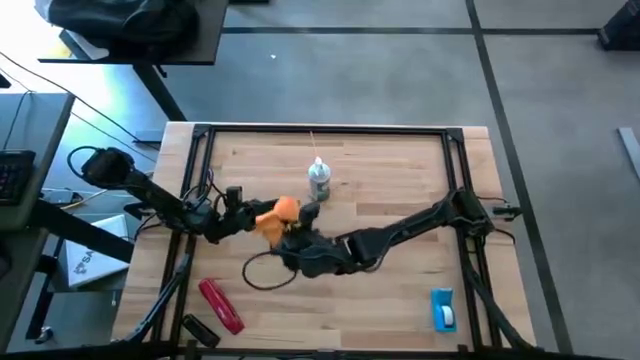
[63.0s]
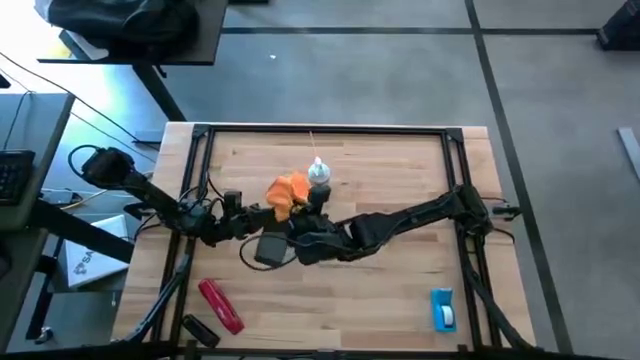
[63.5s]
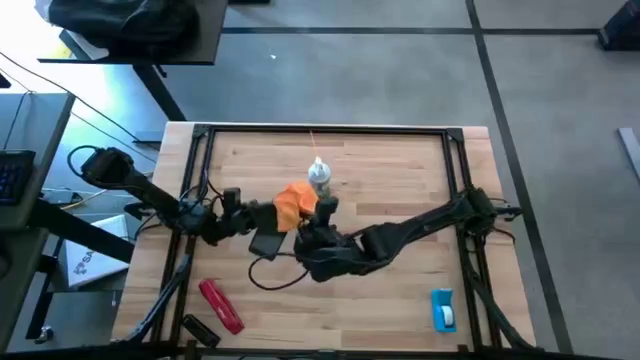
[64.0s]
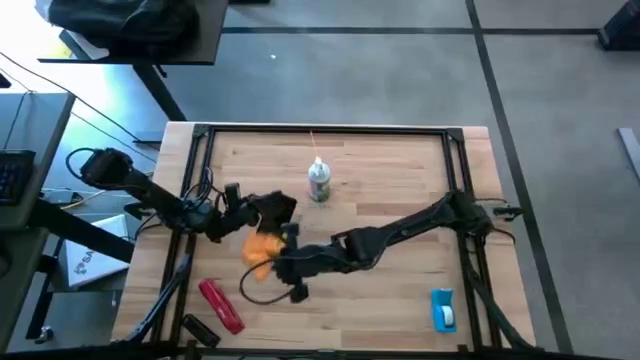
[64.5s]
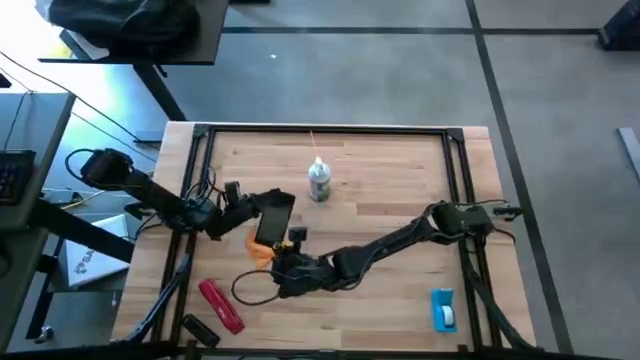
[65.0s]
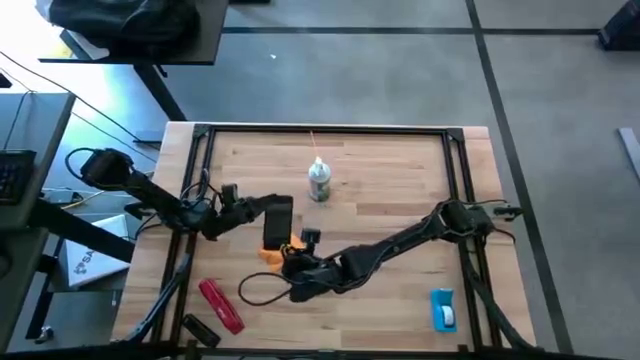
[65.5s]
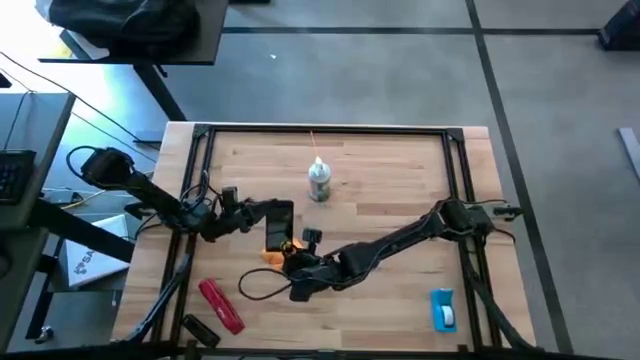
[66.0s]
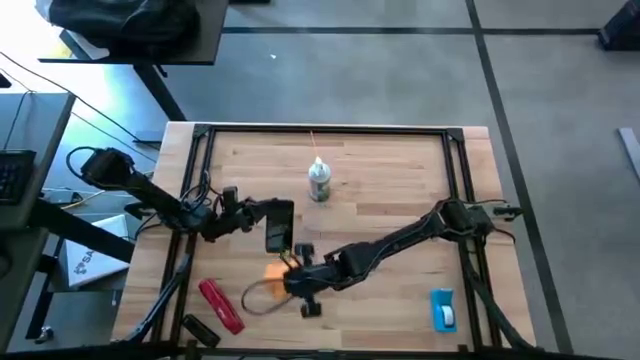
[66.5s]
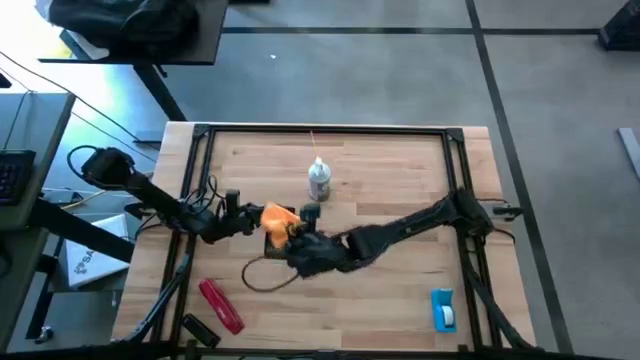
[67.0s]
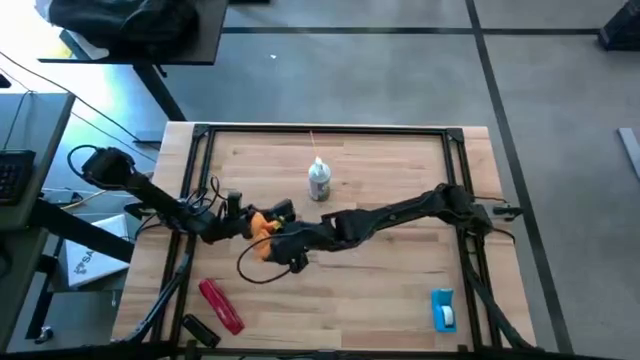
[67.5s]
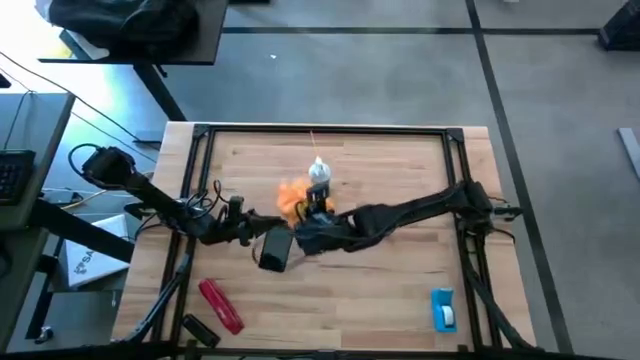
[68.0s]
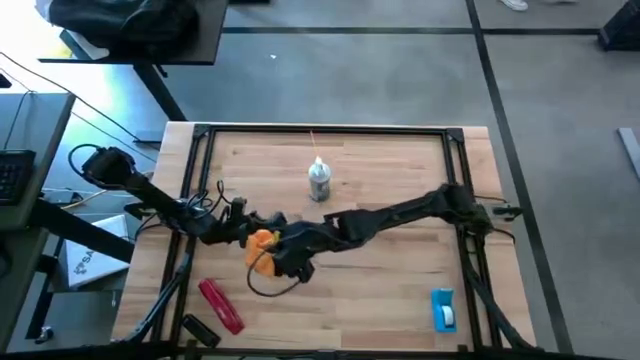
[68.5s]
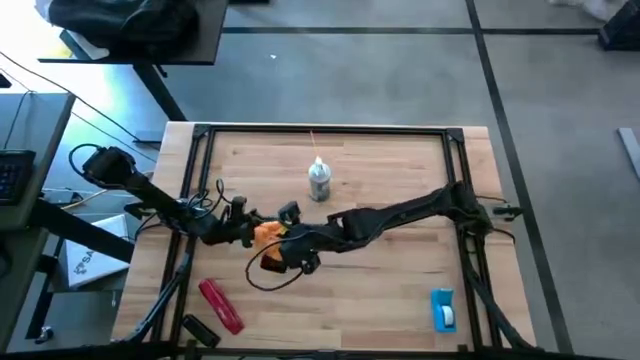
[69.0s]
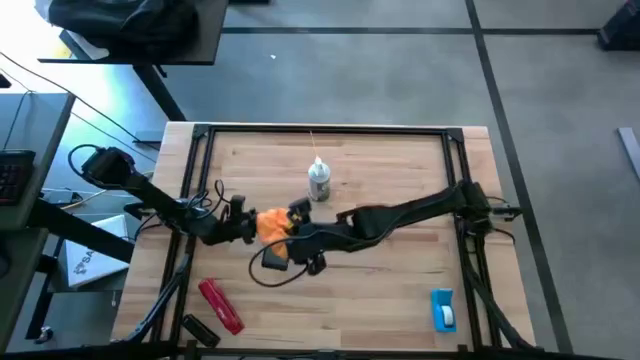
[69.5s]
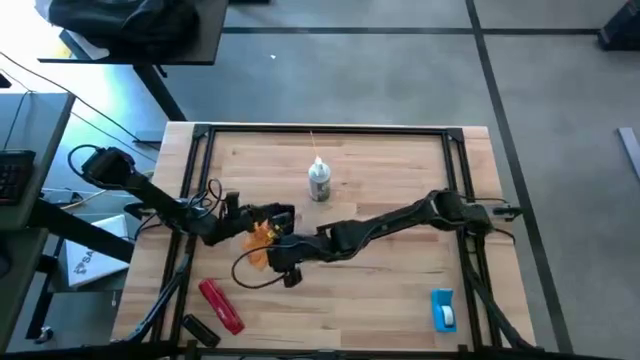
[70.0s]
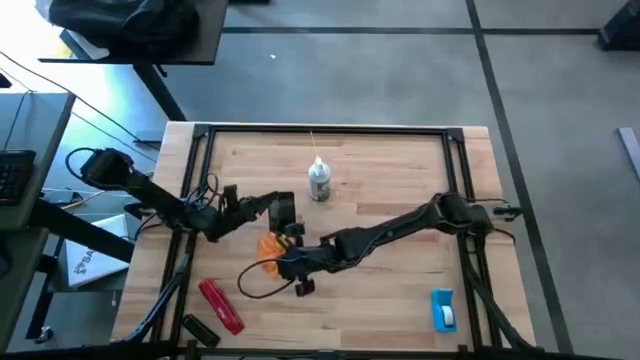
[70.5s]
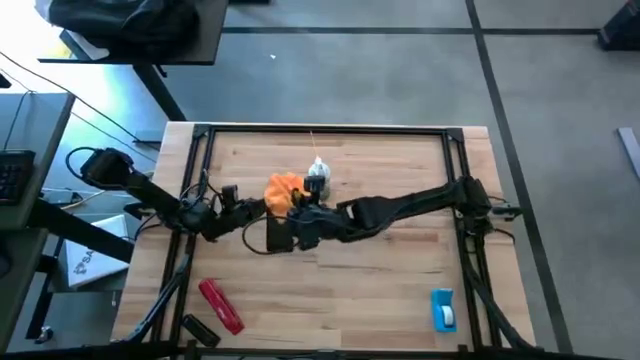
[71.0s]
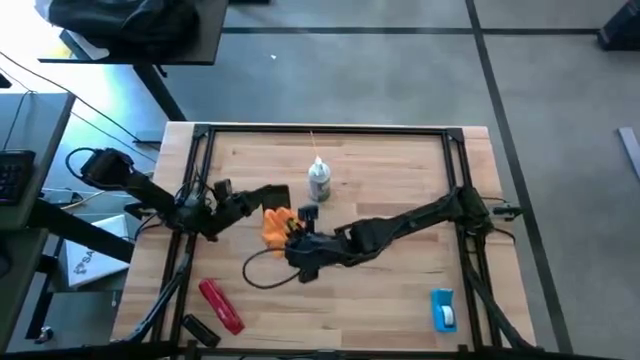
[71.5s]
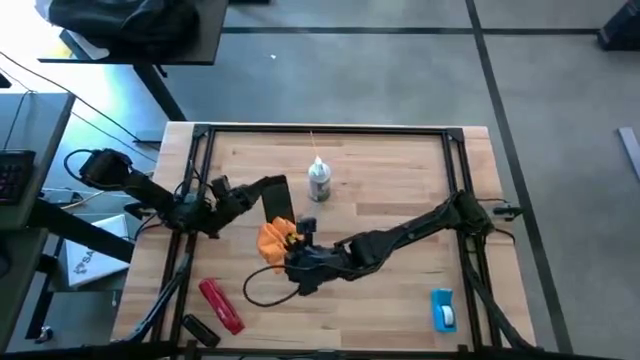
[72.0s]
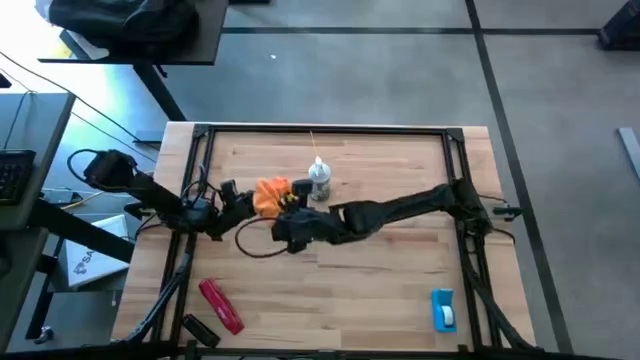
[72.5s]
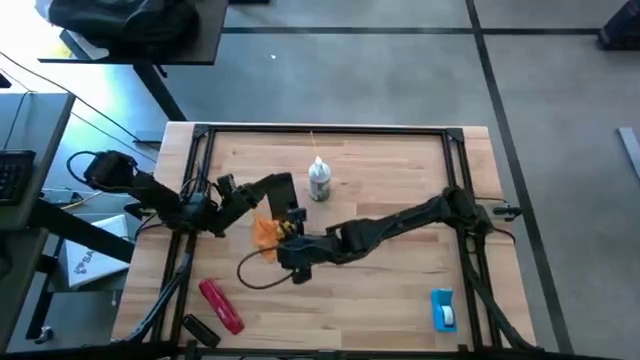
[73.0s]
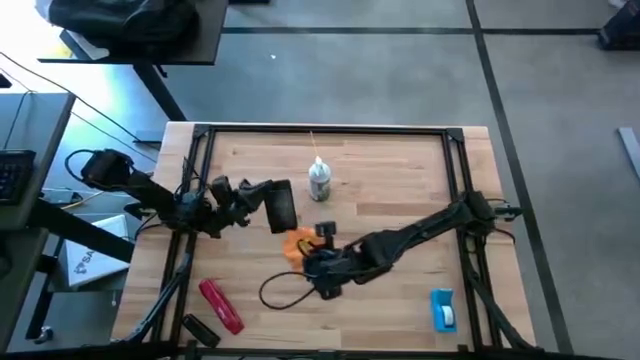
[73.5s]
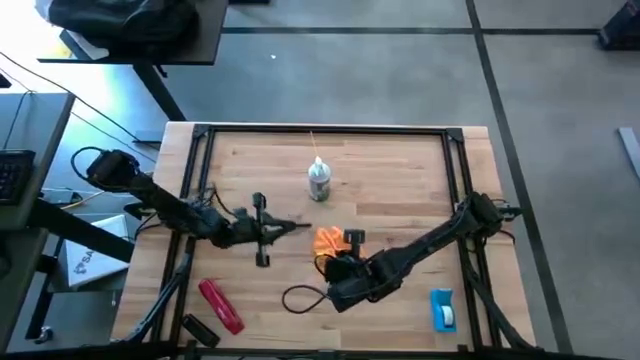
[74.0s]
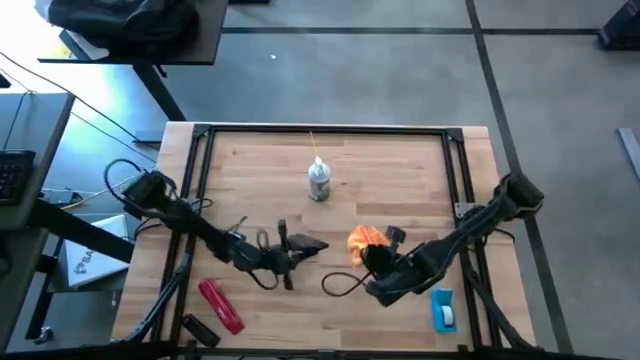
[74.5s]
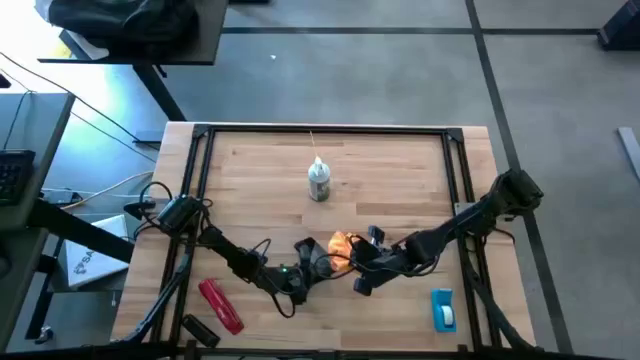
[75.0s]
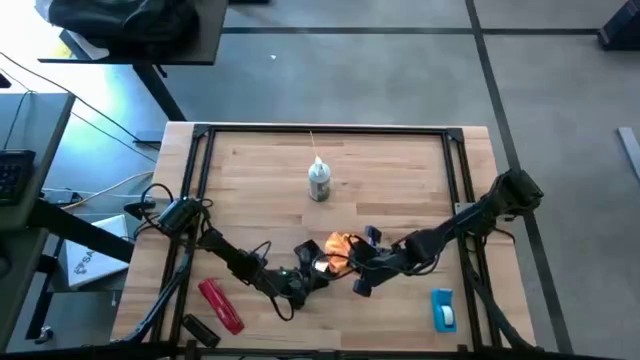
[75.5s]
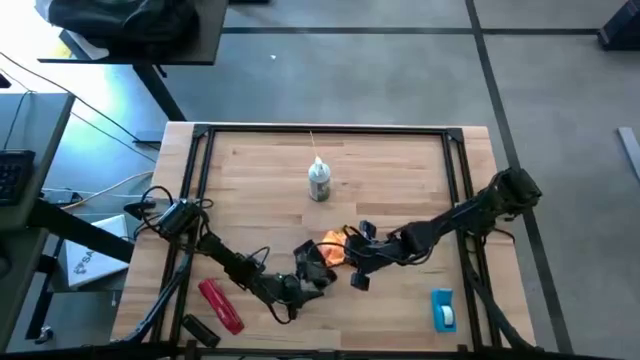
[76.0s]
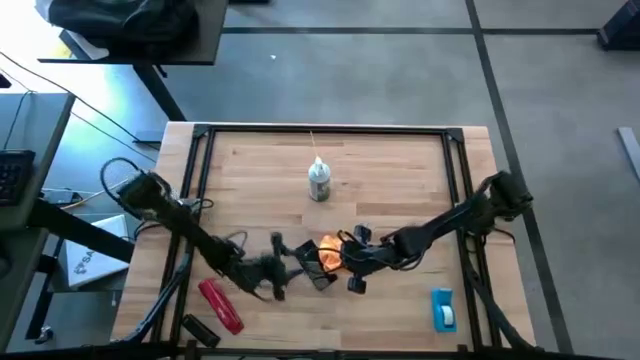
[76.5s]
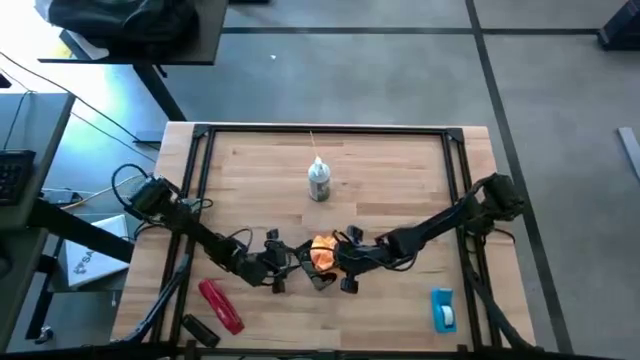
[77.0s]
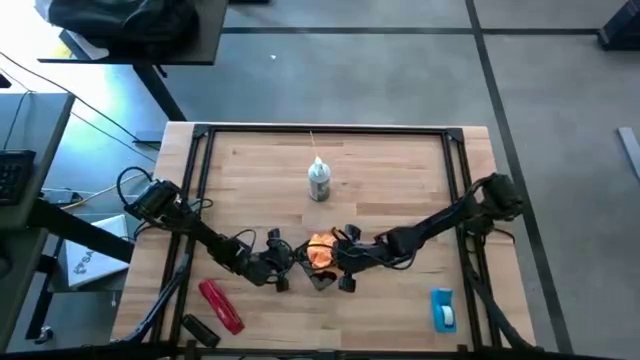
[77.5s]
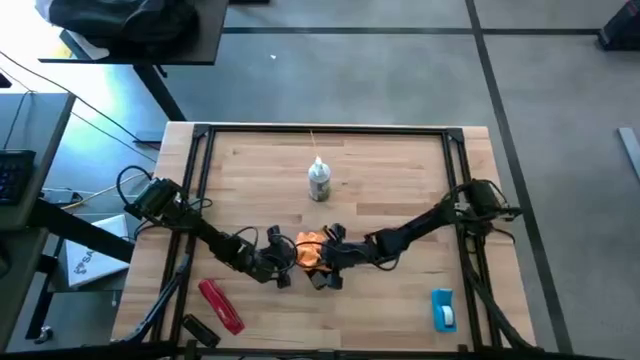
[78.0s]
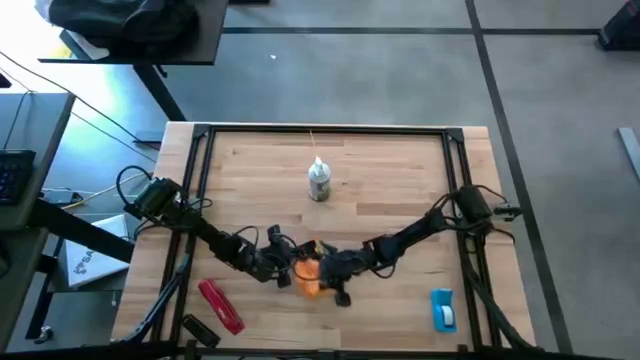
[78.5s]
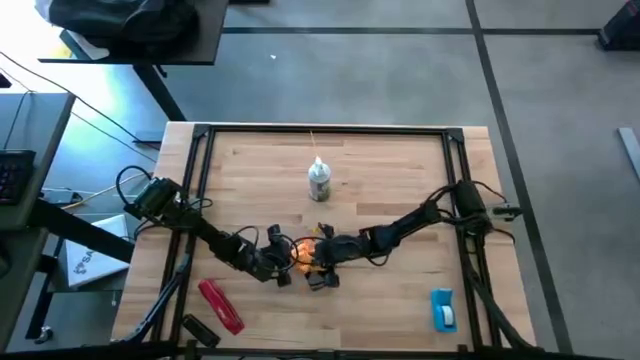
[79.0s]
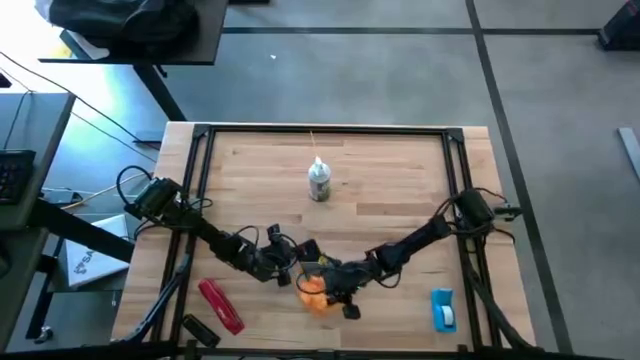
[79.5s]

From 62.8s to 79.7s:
Task: Apply microfiber cloth
Wipe the front and back of the black cellphone using the orange microfiber cloth

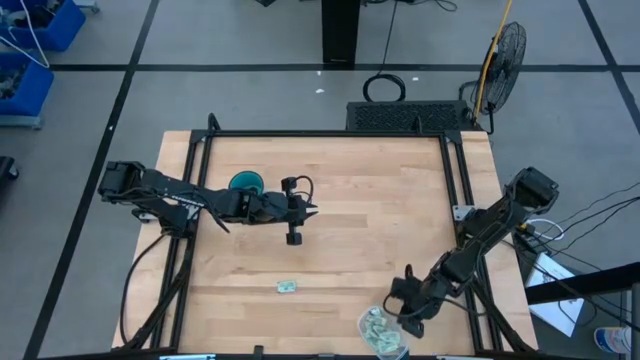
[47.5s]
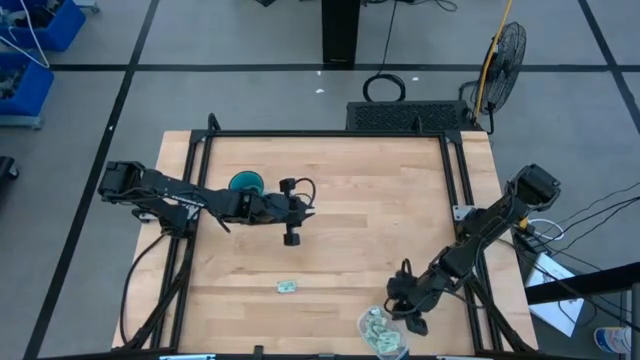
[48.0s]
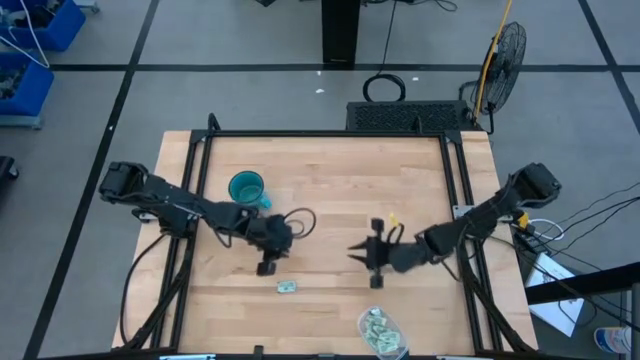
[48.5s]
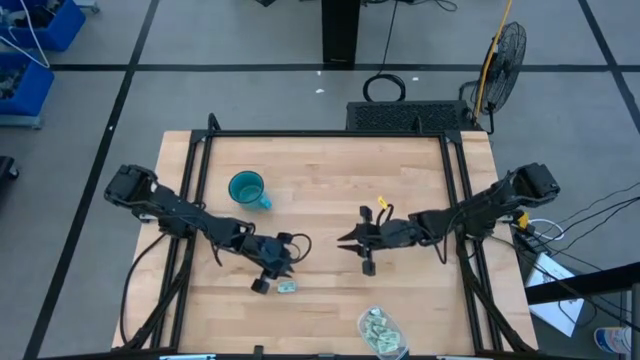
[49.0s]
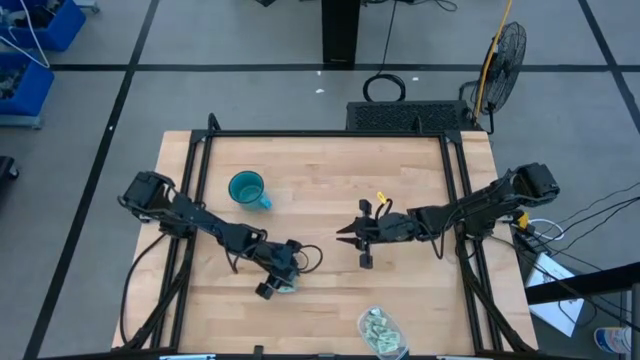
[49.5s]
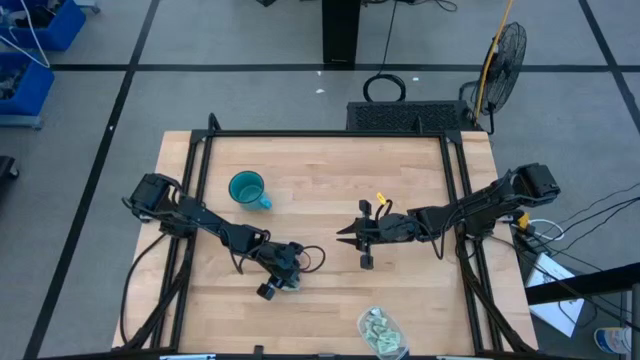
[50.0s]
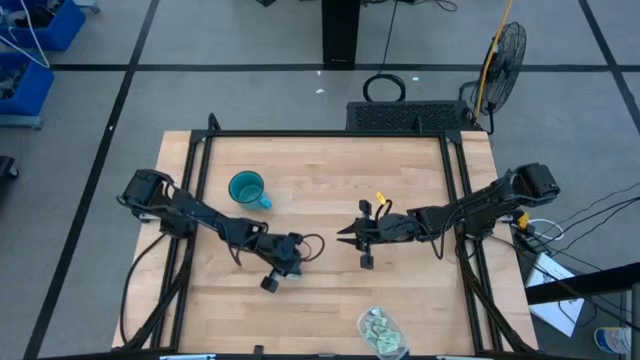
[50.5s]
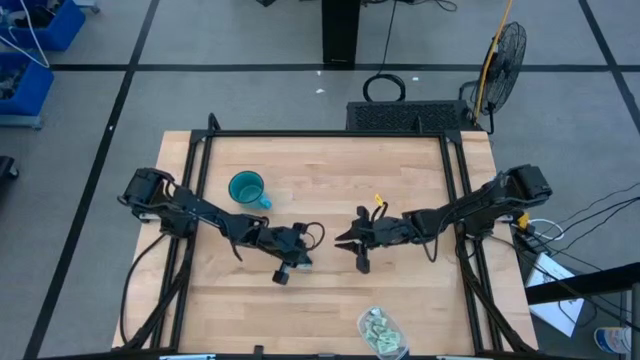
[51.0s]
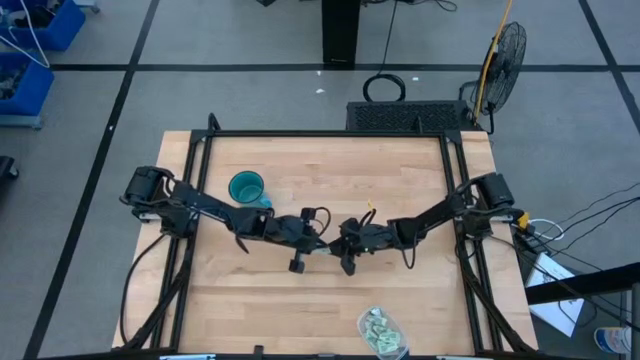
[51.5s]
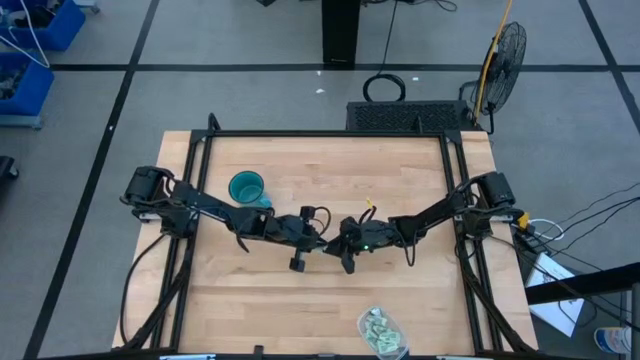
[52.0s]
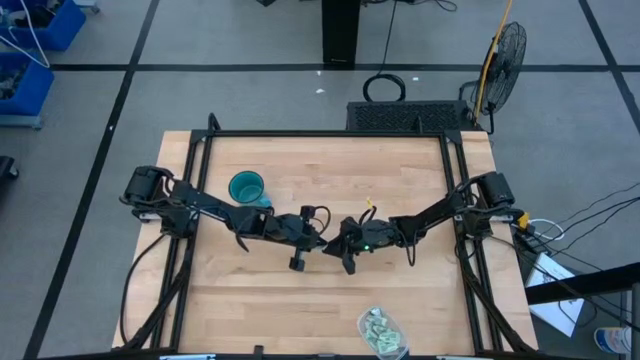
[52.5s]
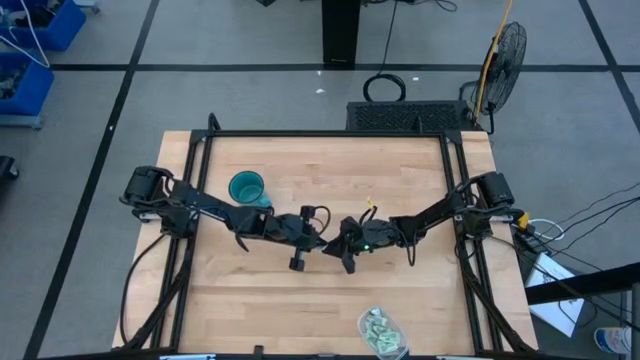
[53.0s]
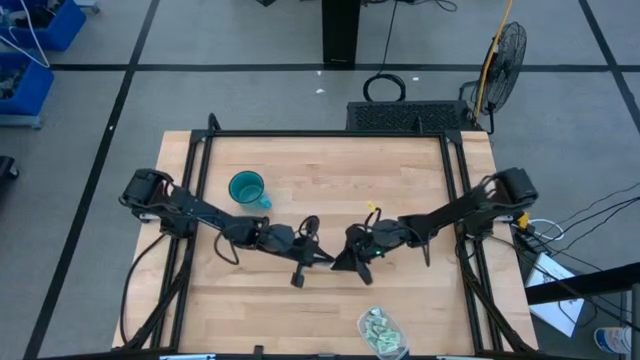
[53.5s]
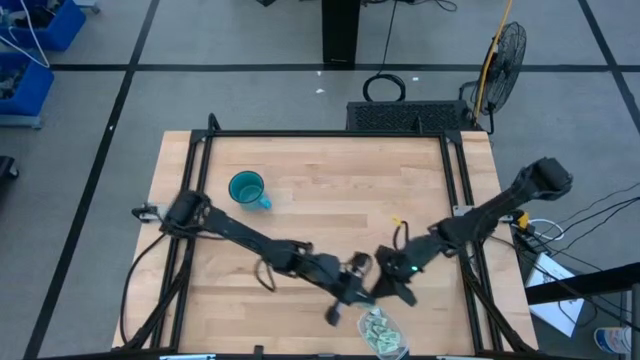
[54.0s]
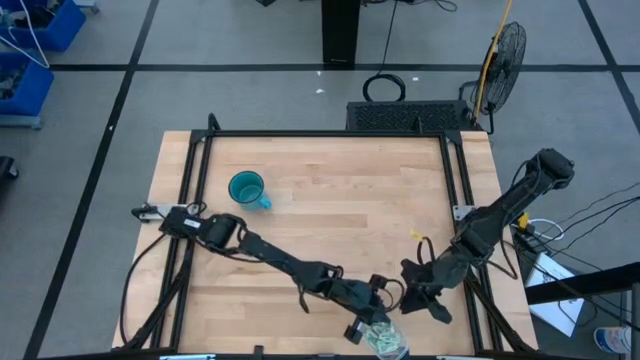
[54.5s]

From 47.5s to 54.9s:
Task: Pick and place Stevia / Truvia into bins
Put the green stevia packet into the transparent container
